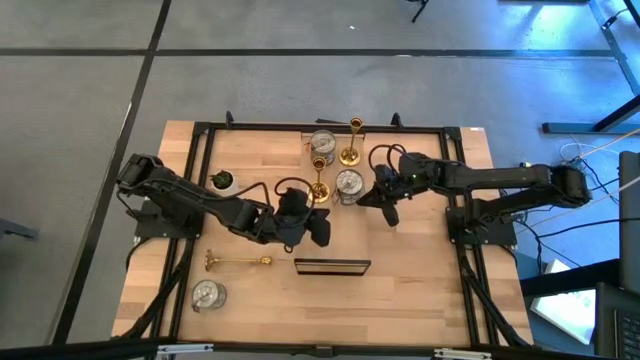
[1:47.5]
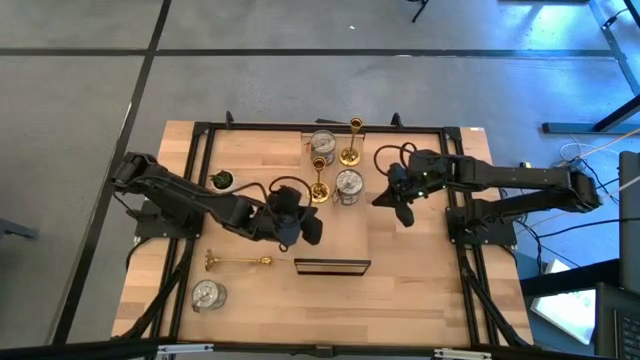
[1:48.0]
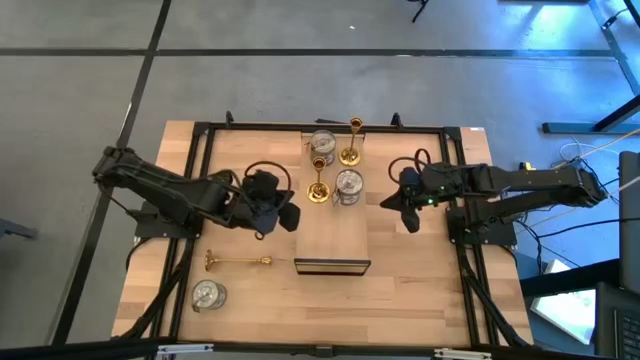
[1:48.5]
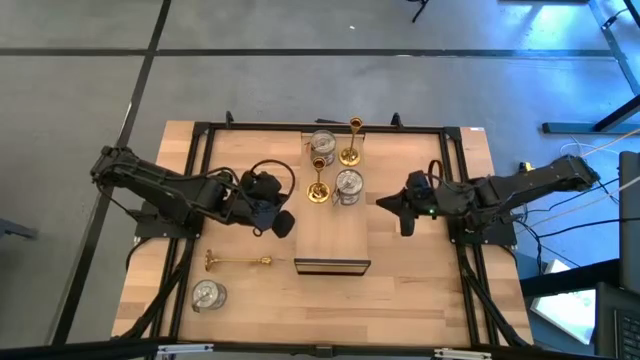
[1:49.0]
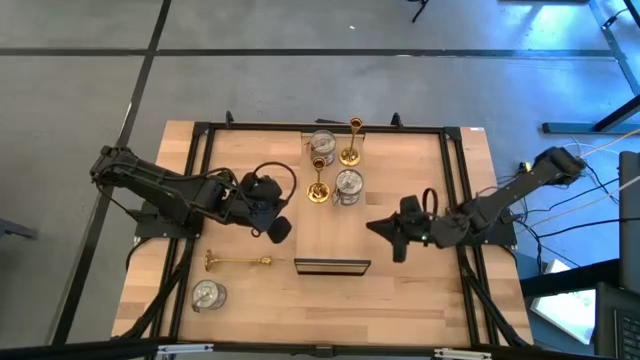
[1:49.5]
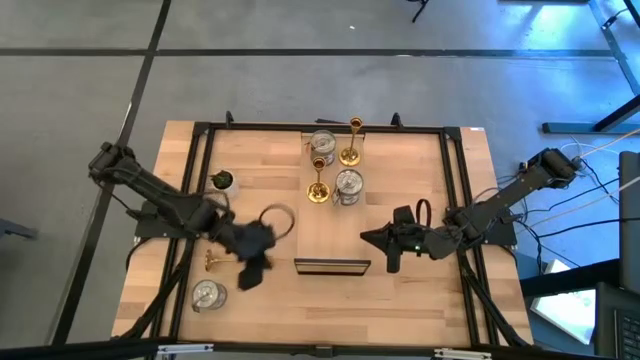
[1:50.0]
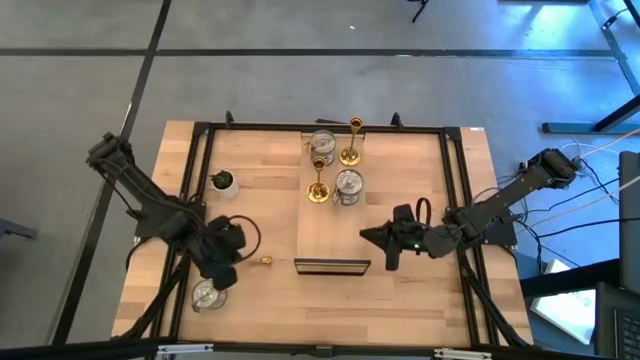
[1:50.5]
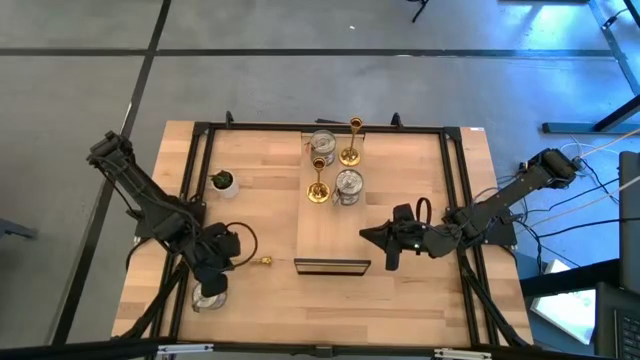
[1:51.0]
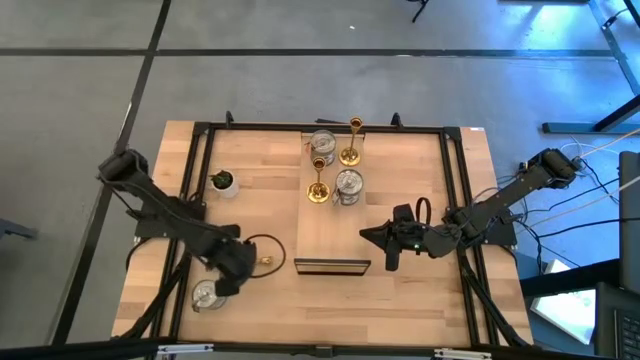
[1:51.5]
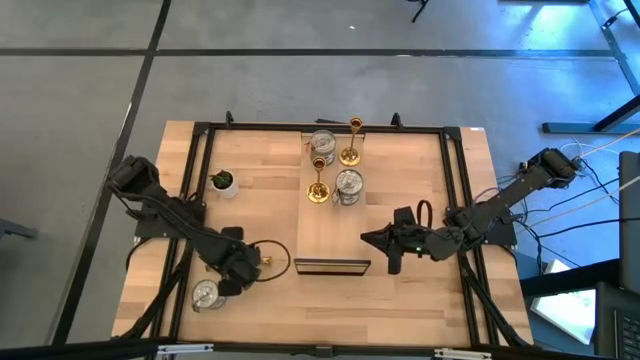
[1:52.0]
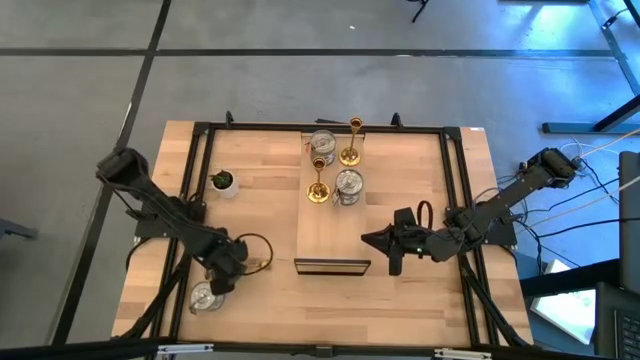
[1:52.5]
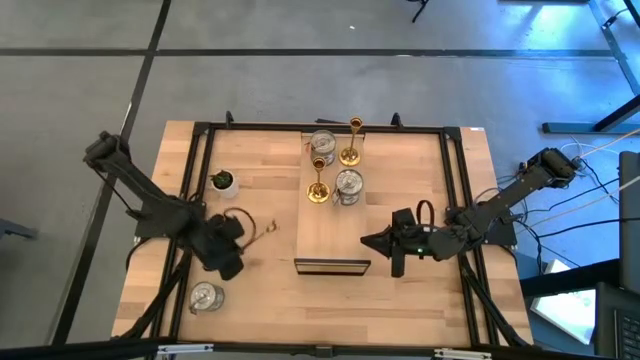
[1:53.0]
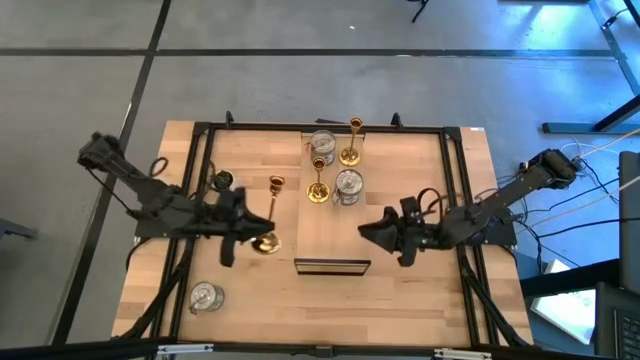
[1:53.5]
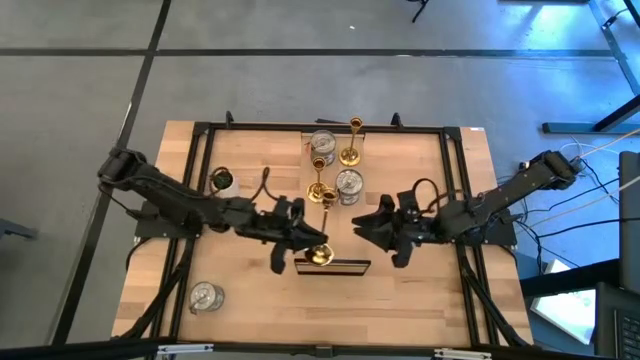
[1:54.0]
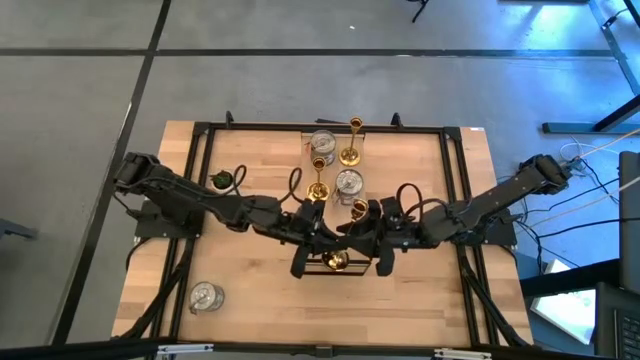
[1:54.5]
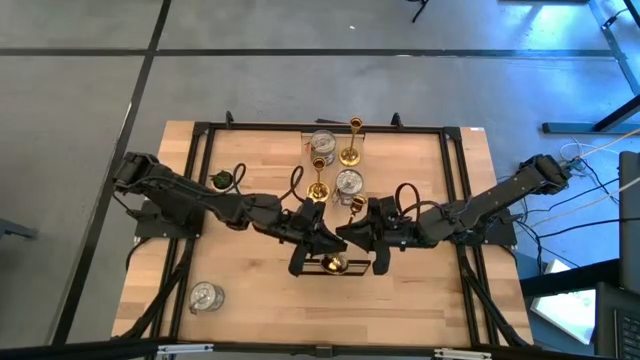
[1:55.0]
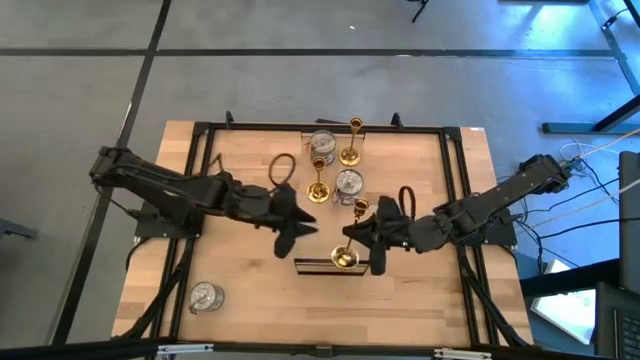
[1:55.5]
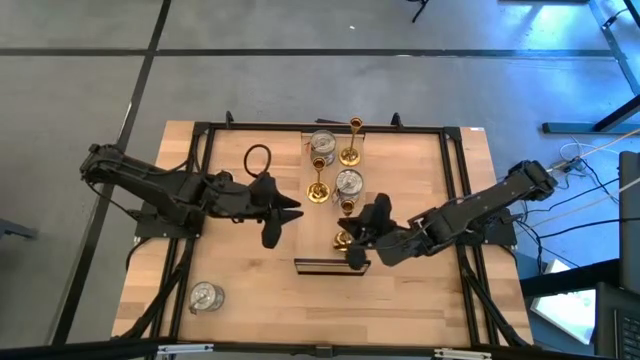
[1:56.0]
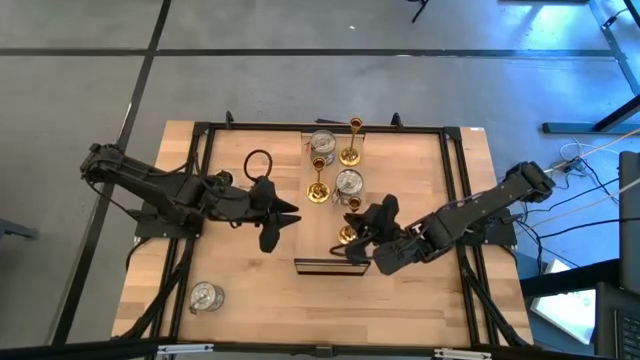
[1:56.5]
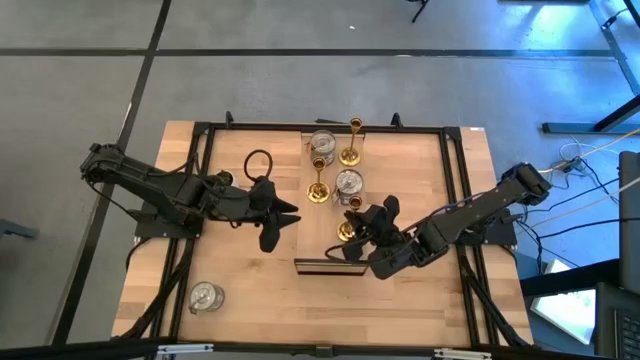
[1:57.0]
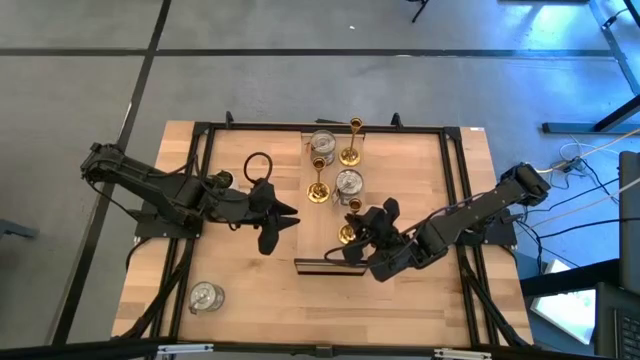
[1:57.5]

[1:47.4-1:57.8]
Task: Pick & Place candle stick holders
Put the gold candle holder on the shelf

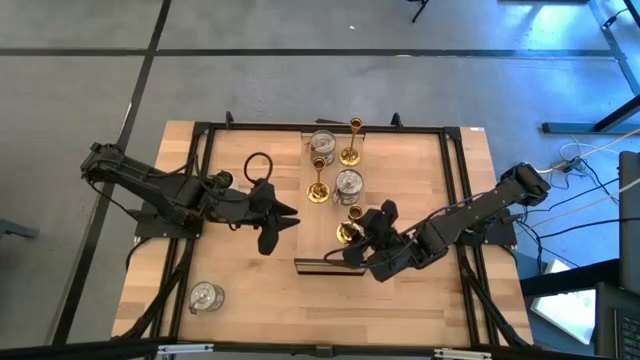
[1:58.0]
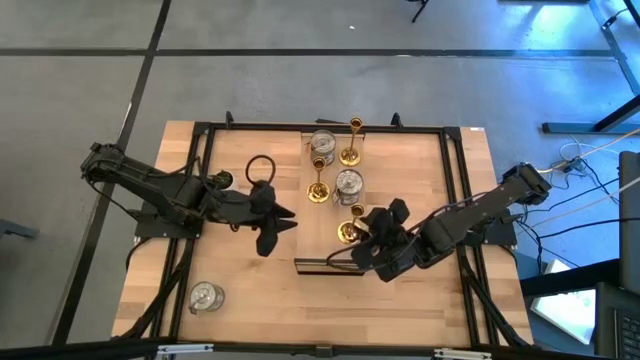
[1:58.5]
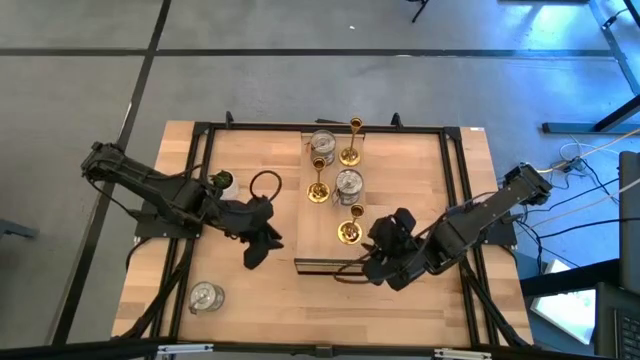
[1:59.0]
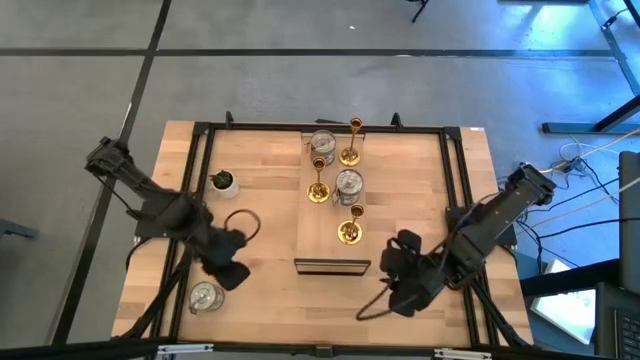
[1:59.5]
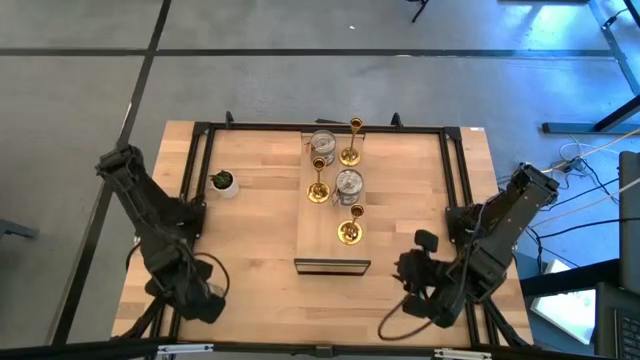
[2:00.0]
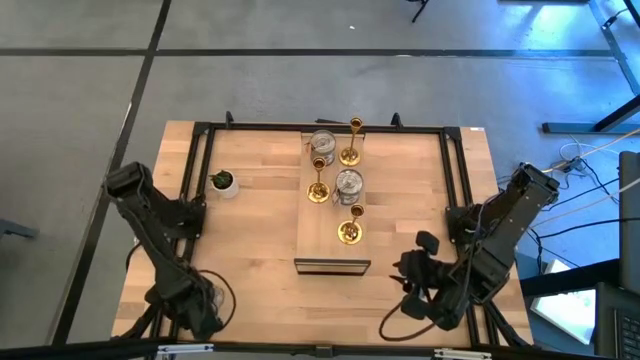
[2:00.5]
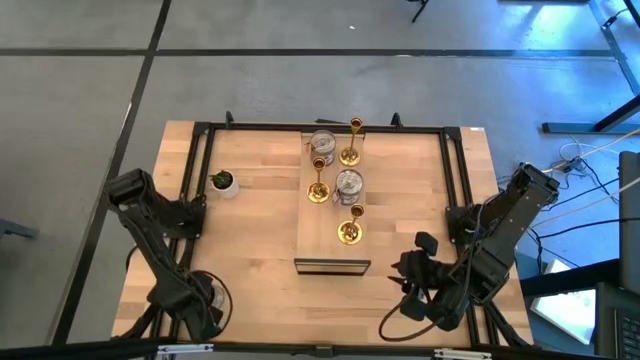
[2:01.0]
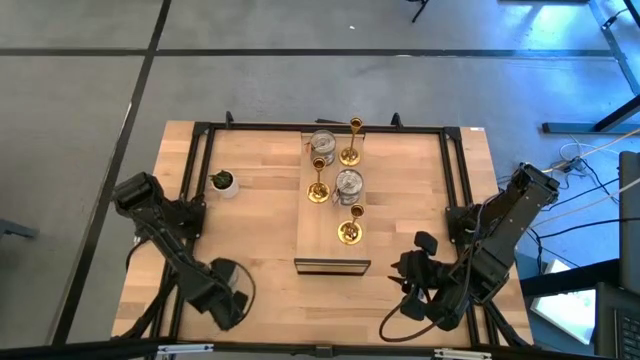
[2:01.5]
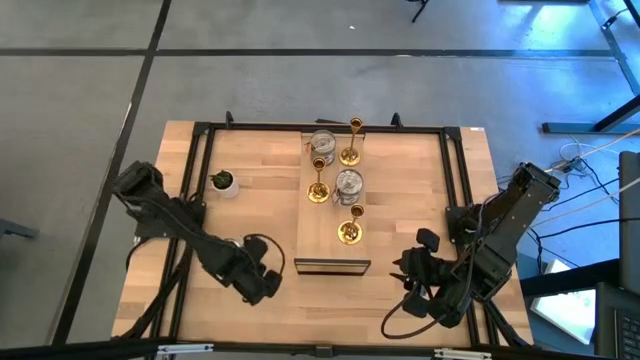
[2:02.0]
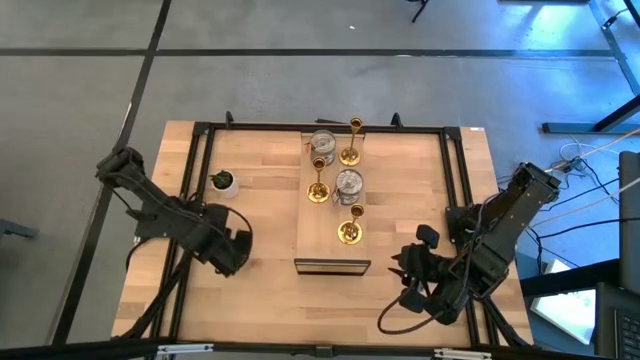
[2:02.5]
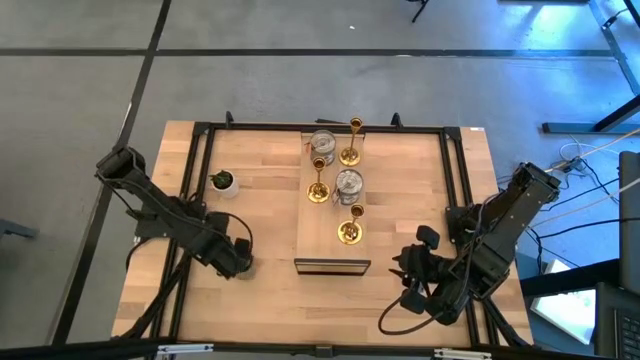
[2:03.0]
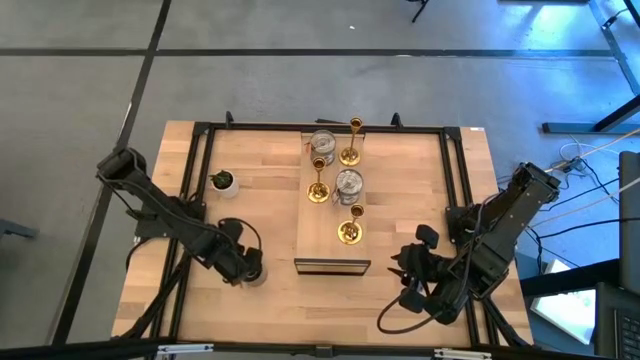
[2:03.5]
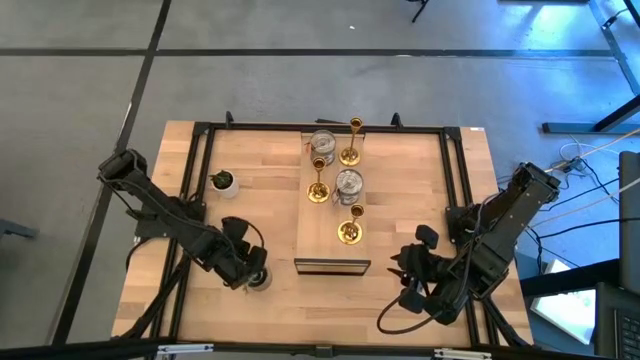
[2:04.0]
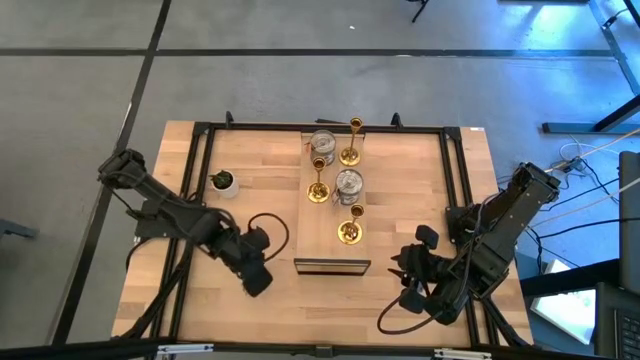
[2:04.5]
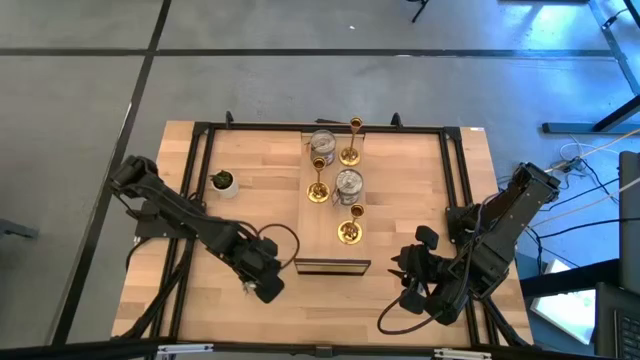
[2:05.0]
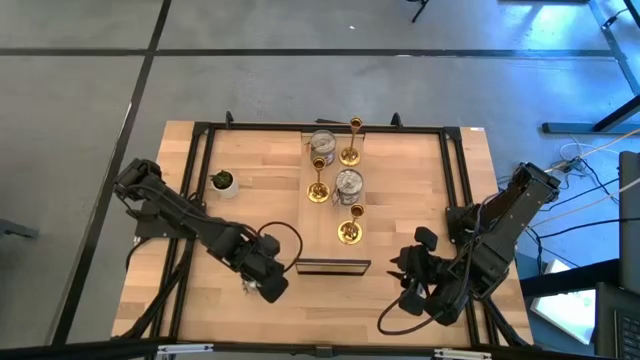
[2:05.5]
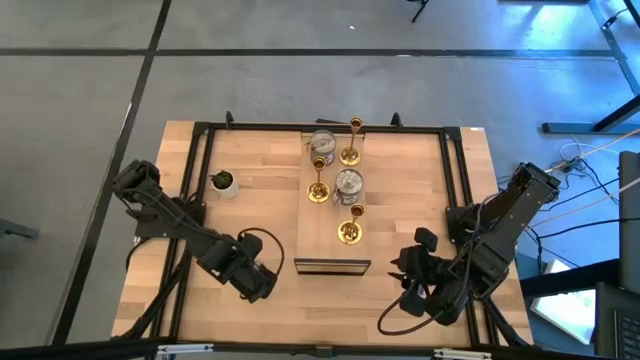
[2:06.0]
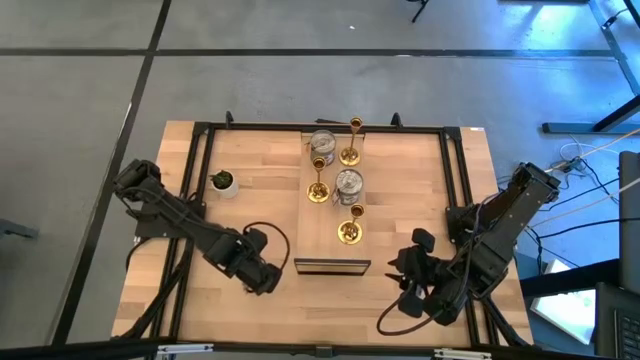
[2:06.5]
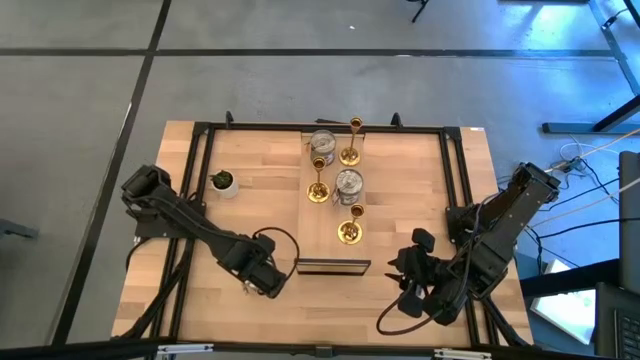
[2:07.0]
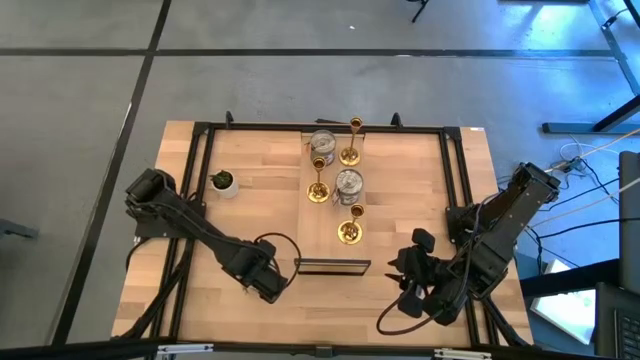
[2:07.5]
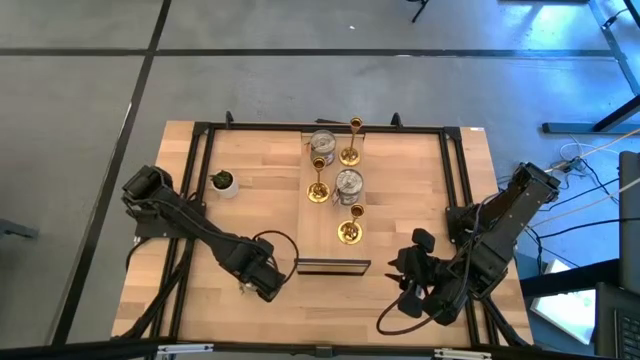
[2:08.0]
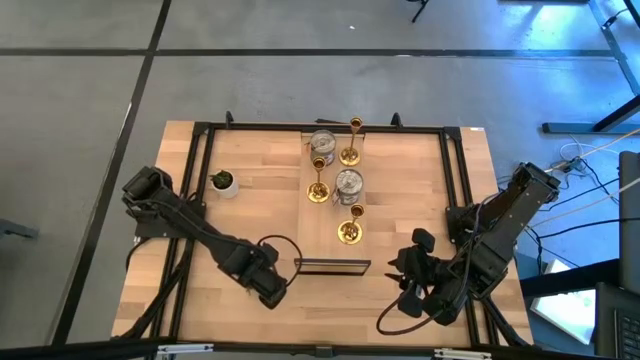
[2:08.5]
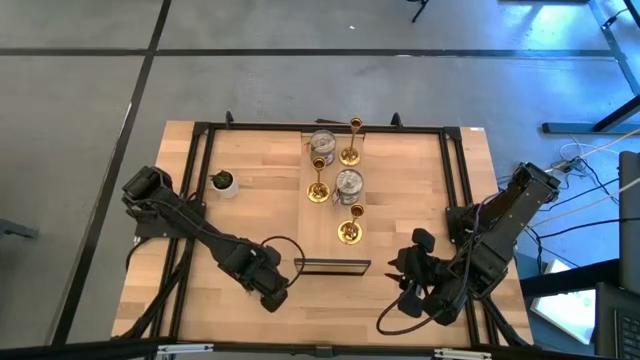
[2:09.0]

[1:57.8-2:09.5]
Put the brown scented candle on the shelf
